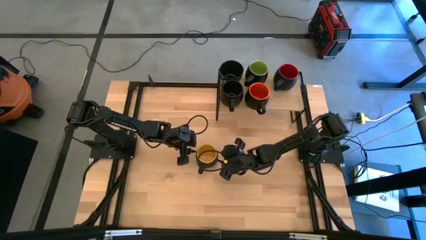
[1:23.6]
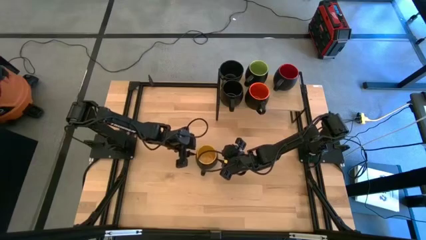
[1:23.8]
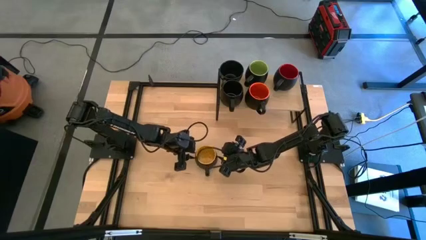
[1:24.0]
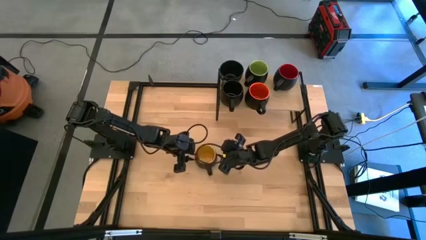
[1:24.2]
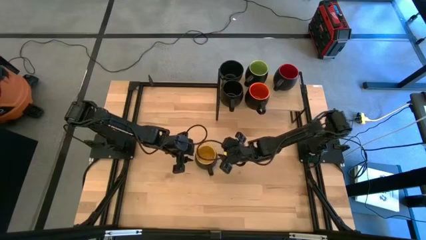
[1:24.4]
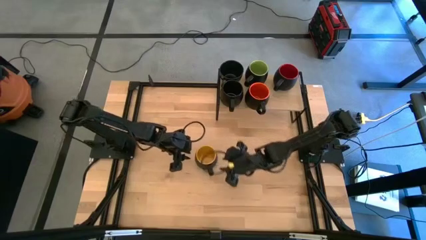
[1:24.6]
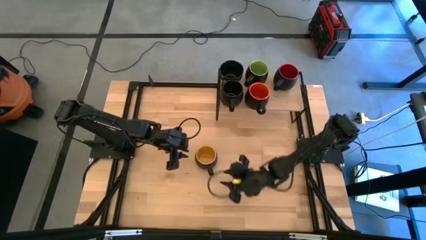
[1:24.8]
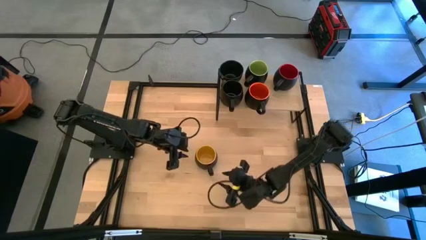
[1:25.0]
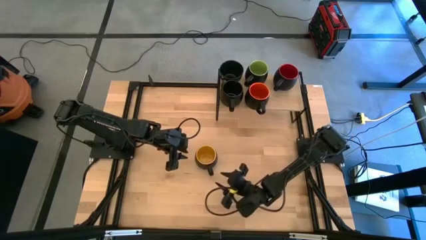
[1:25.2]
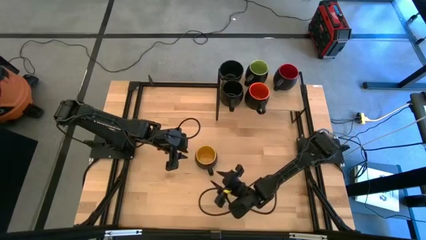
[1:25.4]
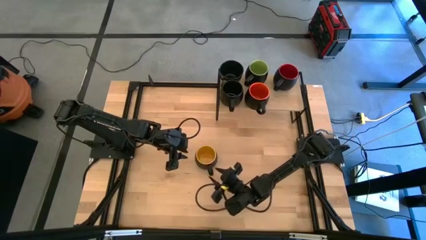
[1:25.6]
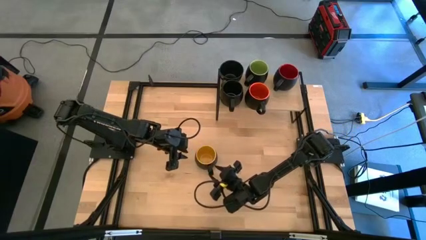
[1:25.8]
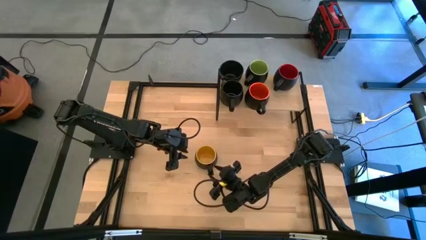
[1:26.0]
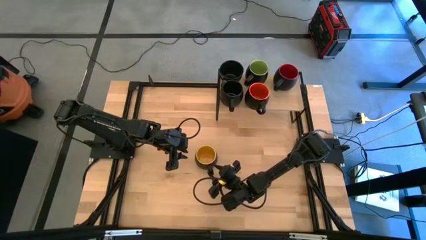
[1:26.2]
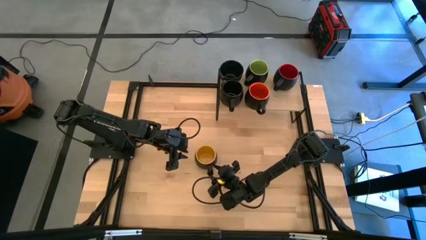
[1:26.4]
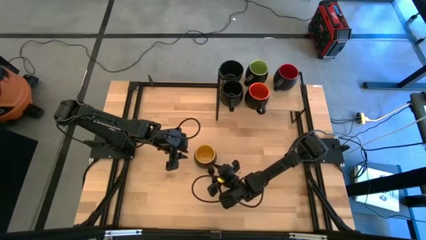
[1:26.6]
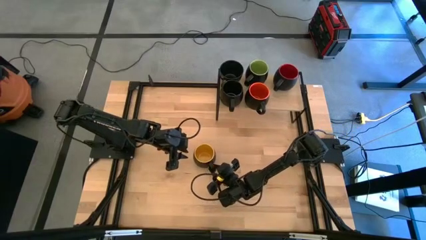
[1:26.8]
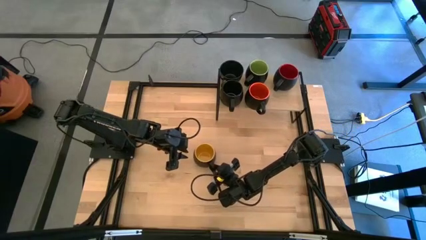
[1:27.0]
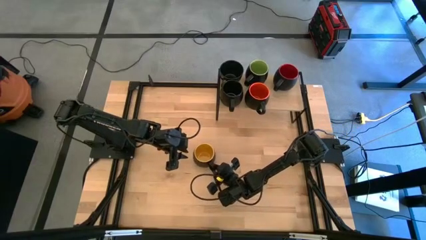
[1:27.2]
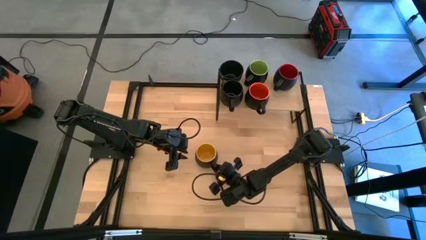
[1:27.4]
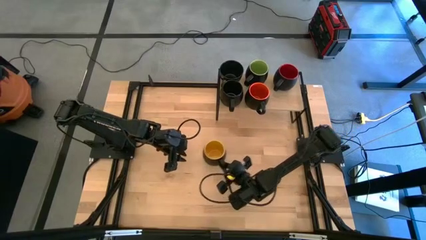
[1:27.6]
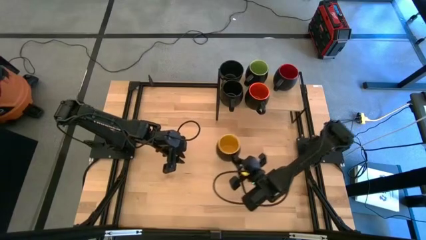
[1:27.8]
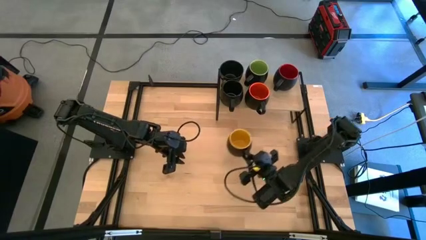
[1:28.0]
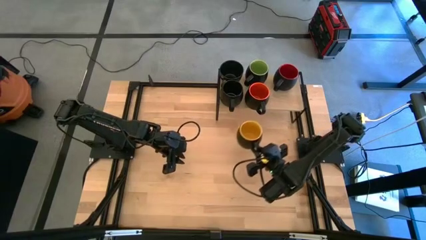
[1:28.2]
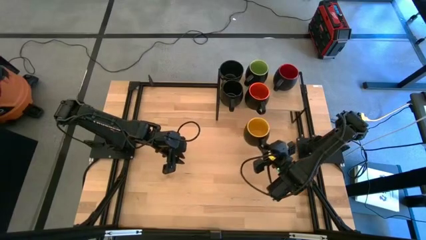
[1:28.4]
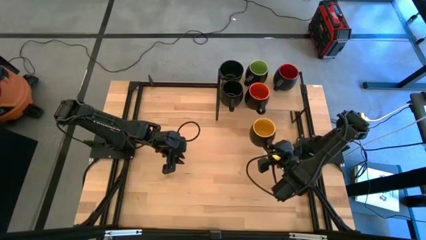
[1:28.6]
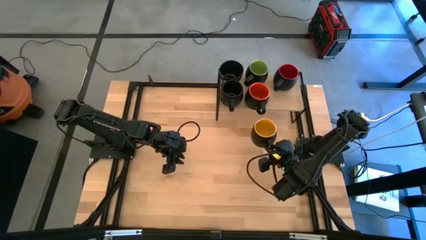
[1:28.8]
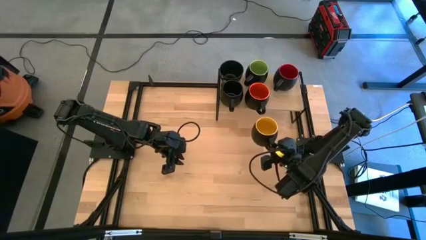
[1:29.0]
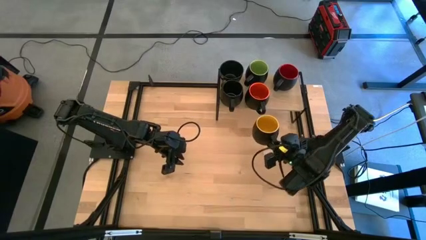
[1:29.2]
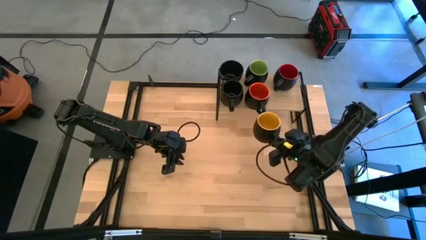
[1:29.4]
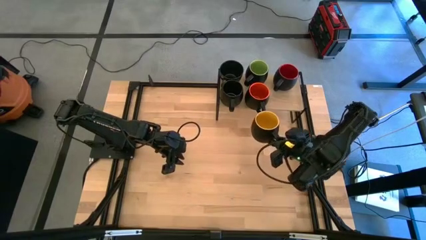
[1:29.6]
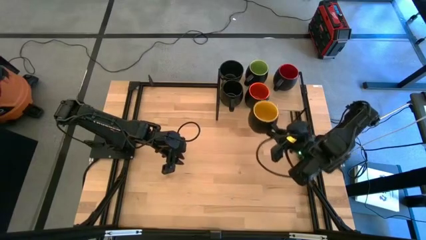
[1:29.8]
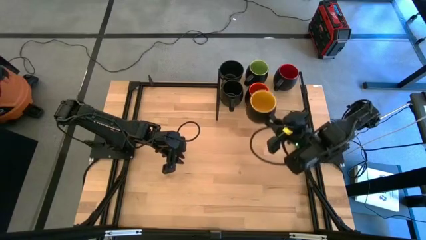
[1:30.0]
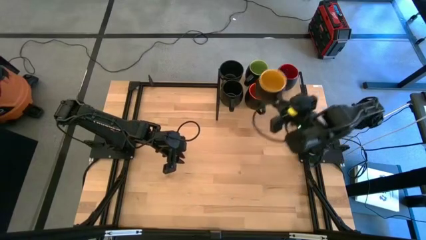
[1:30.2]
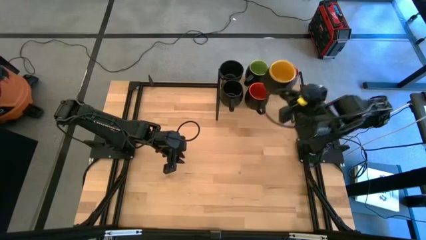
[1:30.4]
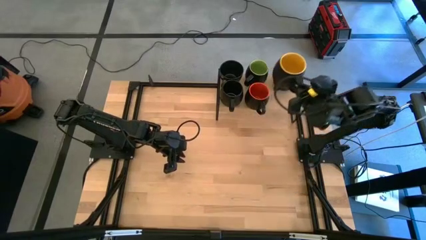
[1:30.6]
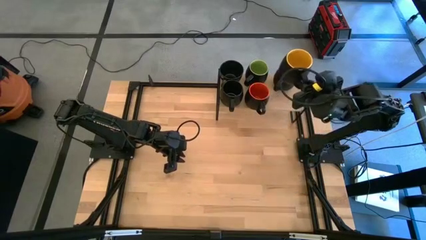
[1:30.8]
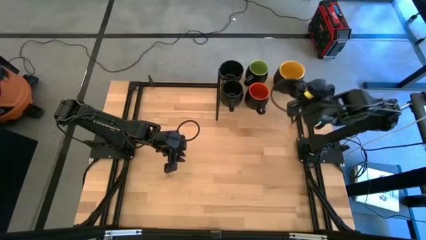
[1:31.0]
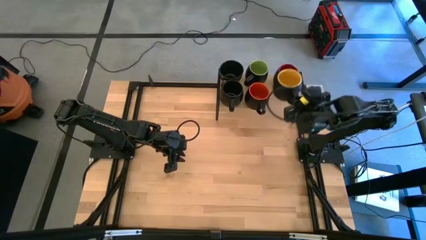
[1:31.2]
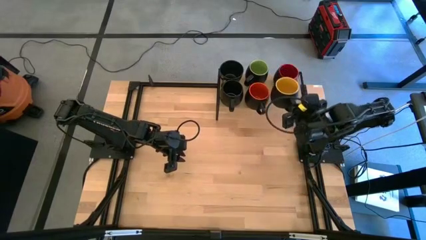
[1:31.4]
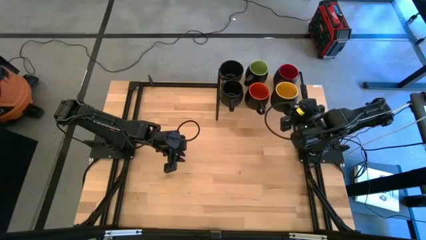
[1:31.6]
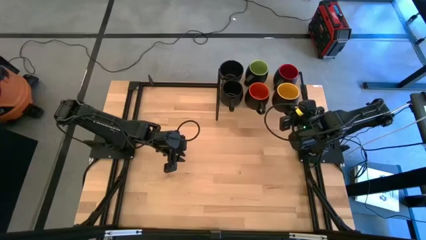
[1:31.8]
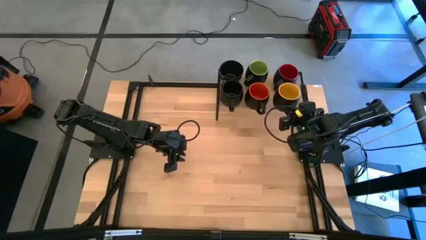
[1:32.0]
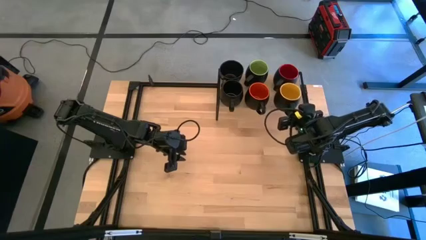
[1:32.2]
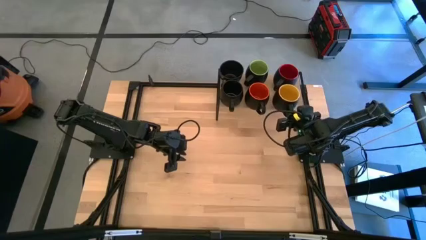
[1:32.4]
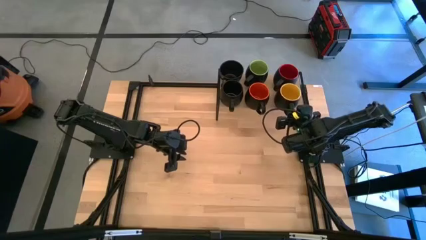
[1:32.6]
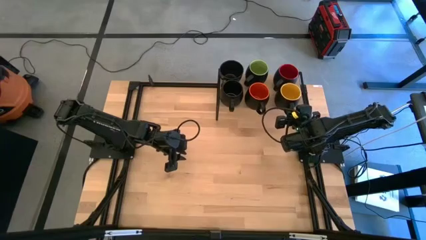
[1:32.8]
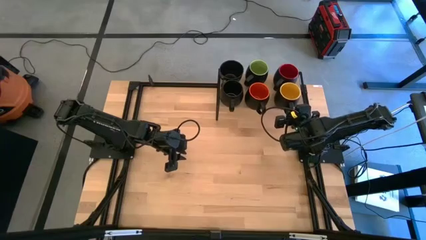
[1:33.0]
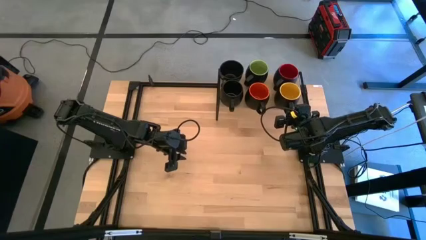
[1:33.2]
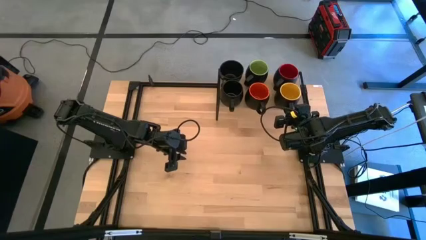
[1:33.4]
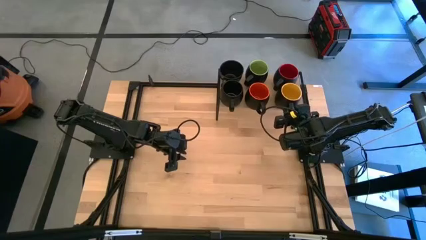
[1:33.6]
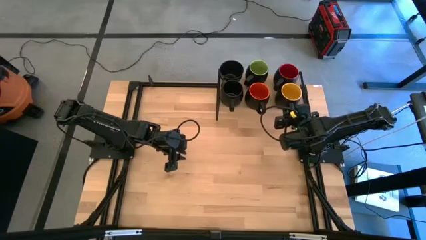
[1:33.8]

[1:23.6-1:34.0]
Task: Place coffee mugs
Put the black yellow mug on the shelf

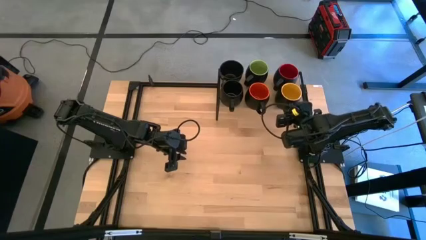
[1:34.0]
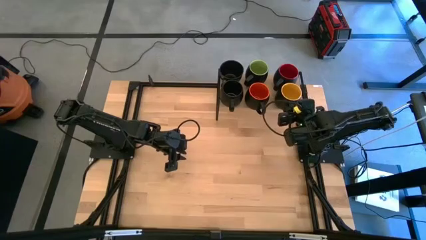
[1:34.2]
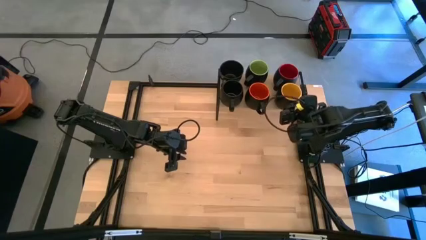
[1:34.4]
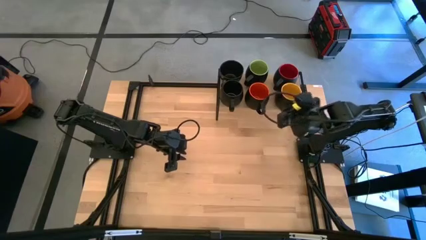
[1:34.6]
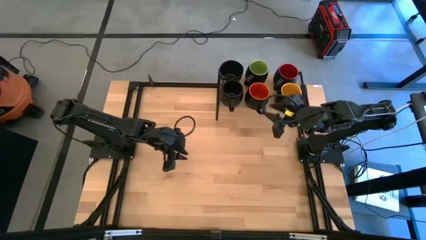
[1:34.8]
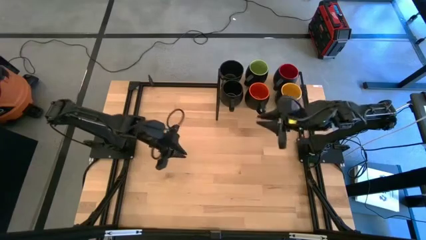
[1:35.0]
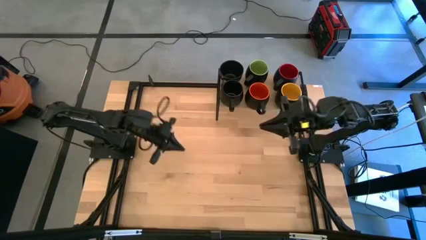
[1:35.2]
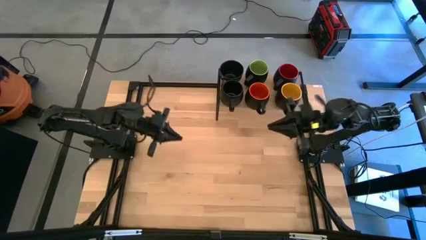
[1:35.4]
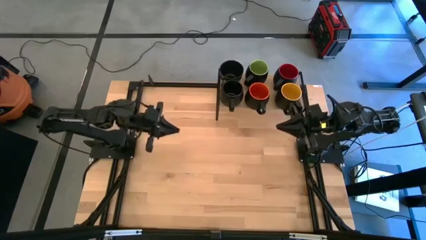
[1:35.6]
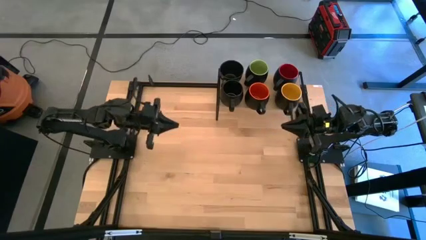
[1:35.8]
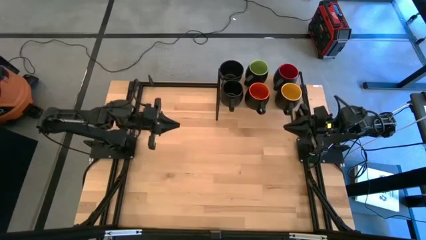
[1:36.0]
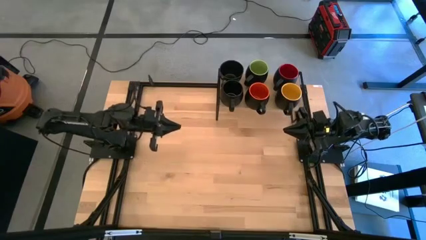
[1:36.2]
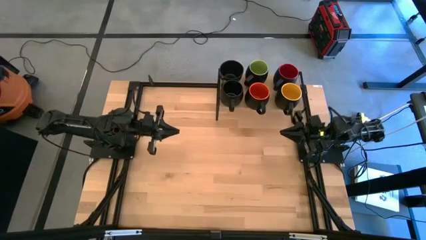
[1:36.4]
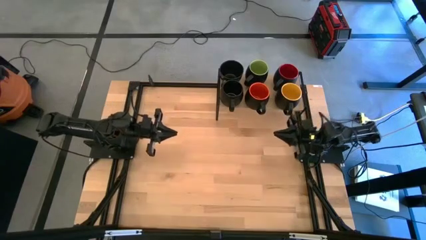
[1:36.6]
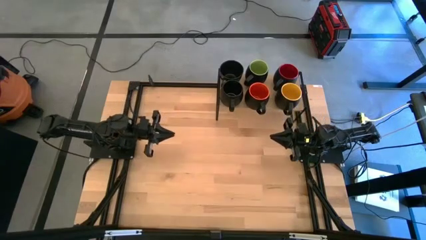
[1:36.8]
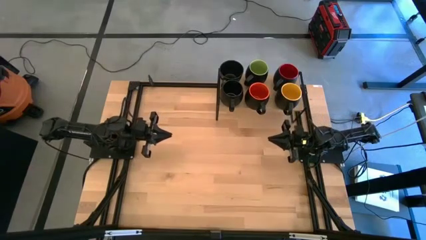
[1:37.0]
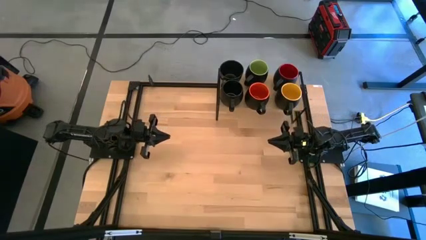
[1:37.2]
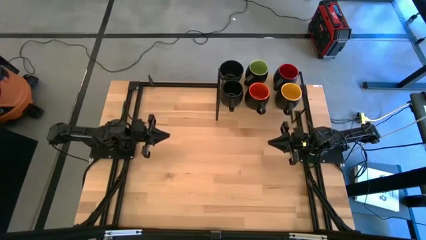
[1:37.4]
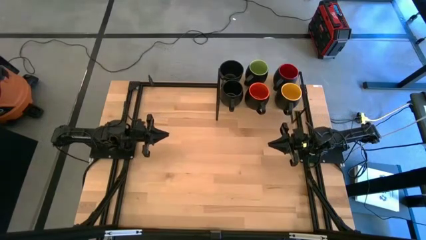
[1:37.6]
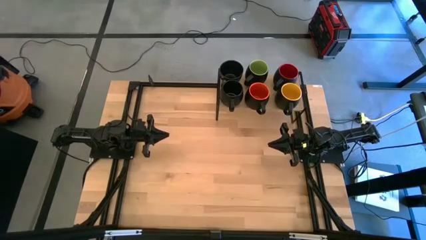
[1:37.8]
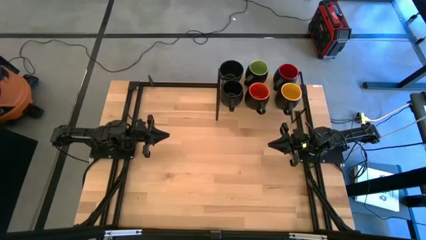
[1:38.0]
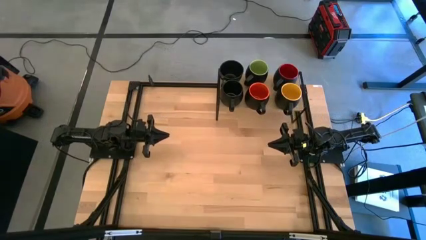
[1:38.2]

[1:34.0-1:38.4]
Return to Home Position
